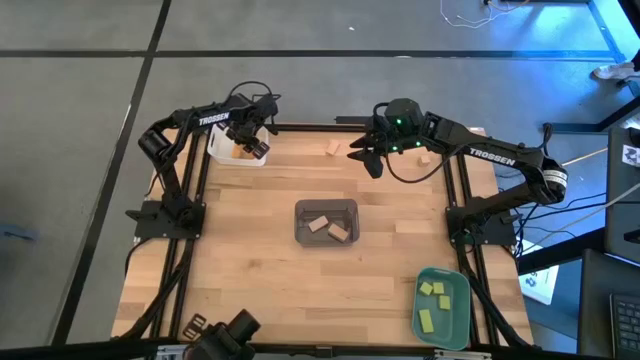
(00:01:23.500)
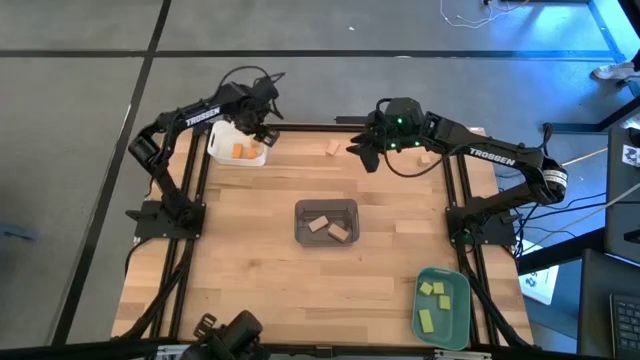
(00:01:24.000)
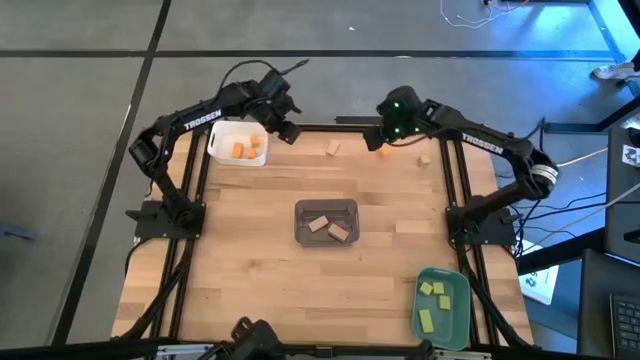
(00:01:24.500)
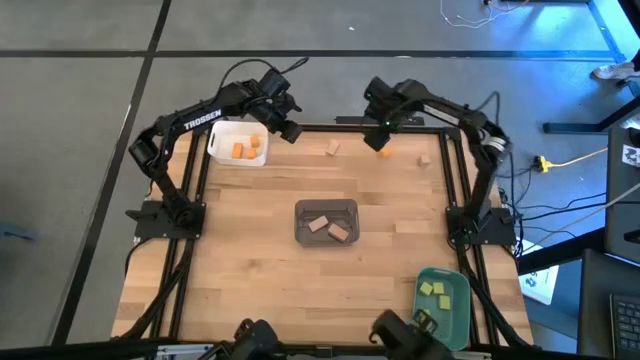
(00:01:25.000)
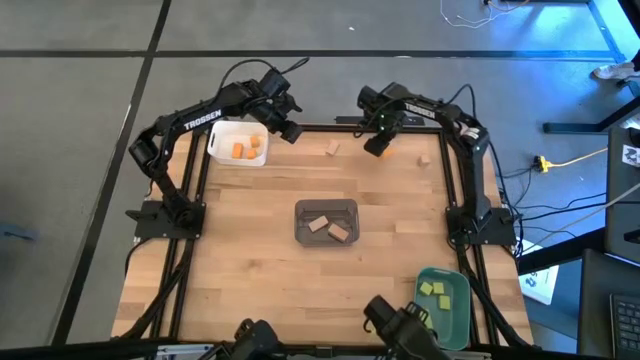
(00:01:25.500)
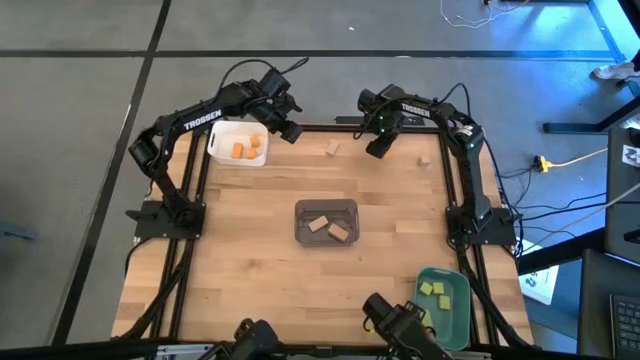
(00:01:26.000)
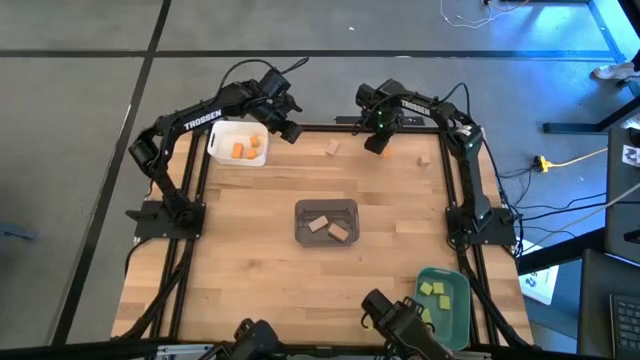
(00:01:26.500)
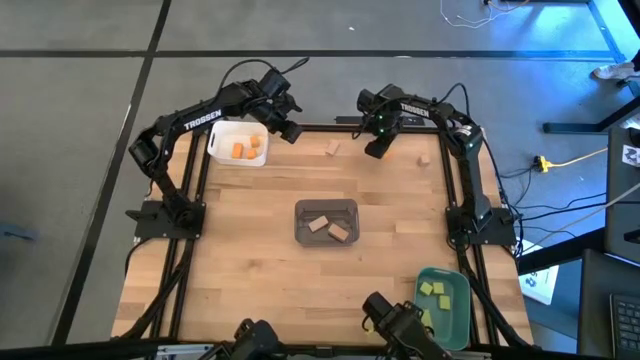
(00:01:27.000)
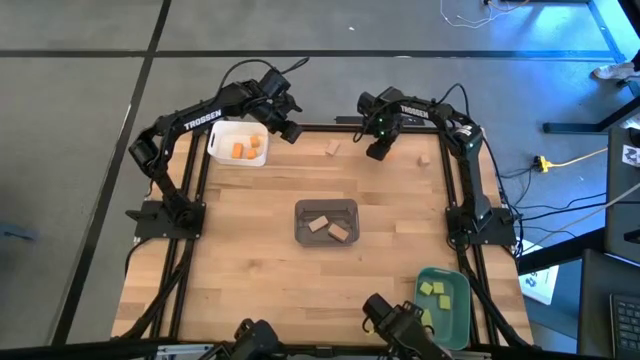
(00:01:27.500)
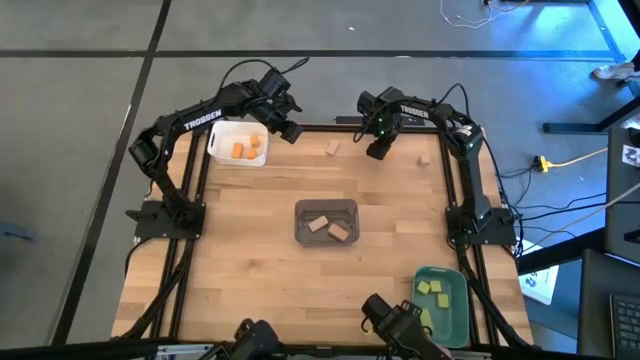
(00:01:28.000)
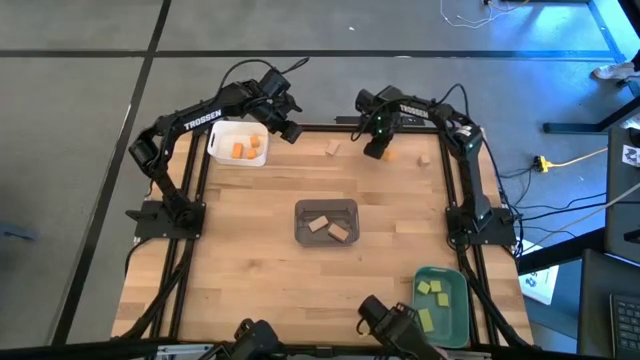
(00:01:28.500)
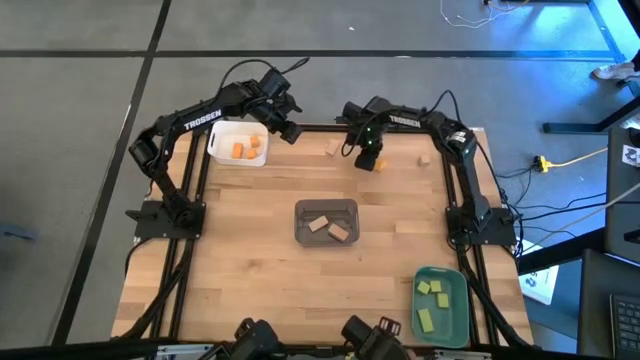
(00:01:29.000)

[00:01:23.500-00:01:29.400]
Task: Sort & place blocks by color
Put the yellow block into the white bin

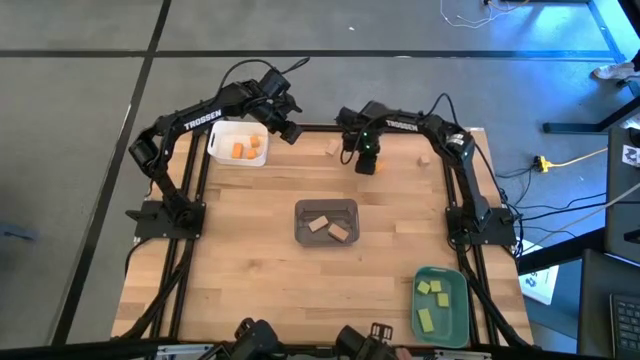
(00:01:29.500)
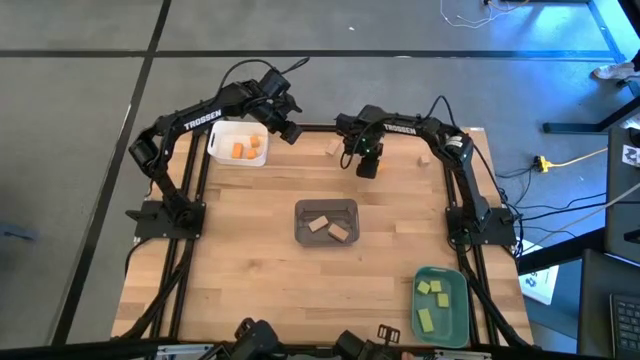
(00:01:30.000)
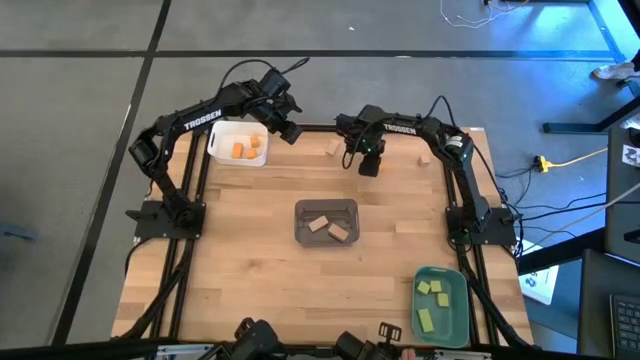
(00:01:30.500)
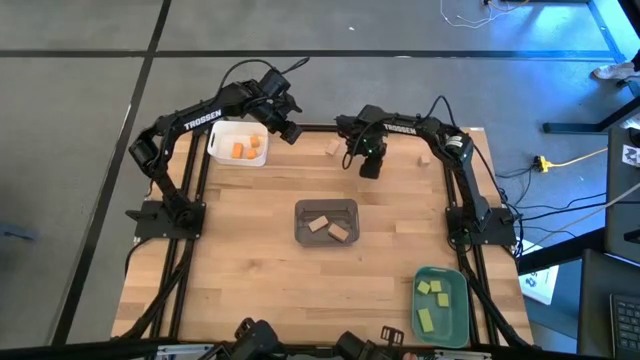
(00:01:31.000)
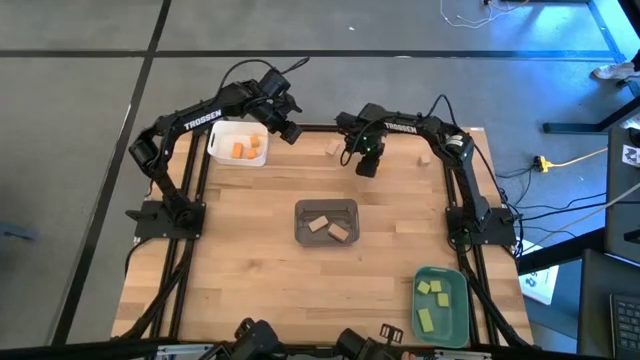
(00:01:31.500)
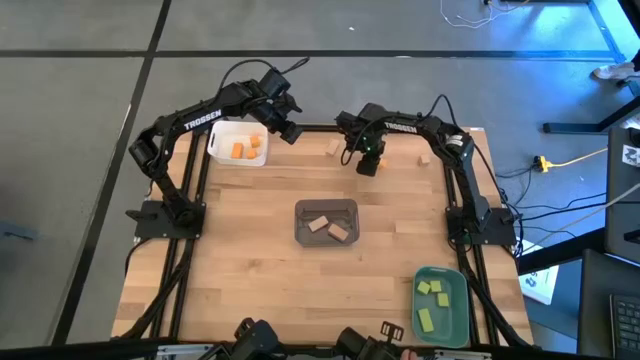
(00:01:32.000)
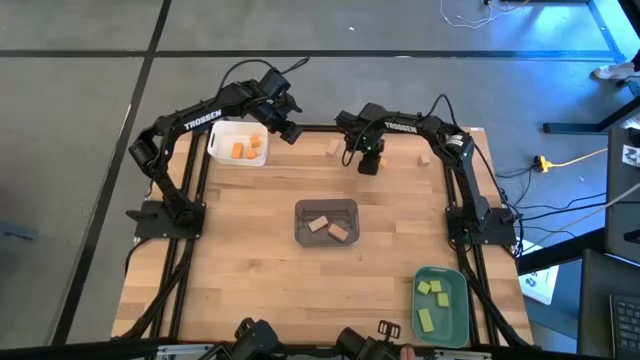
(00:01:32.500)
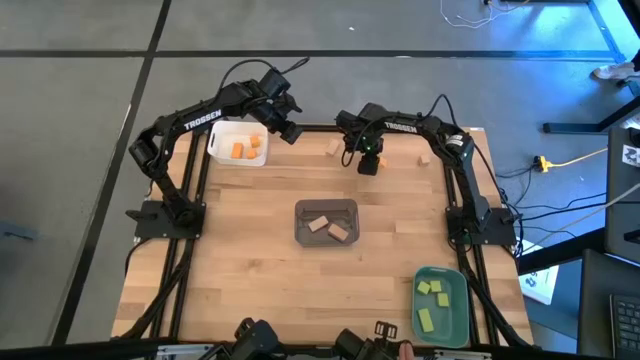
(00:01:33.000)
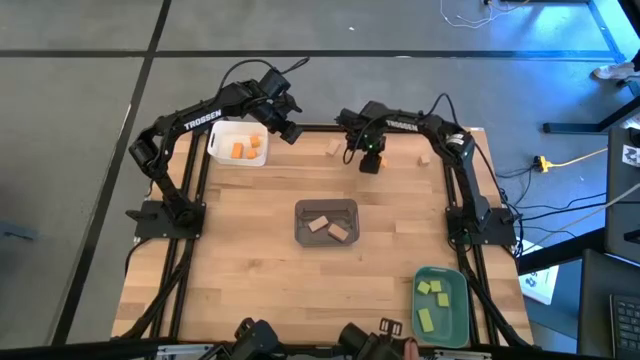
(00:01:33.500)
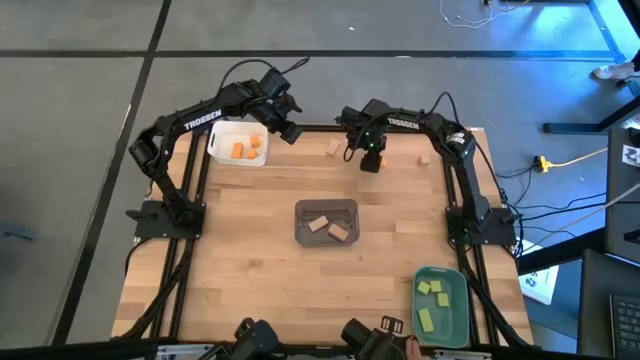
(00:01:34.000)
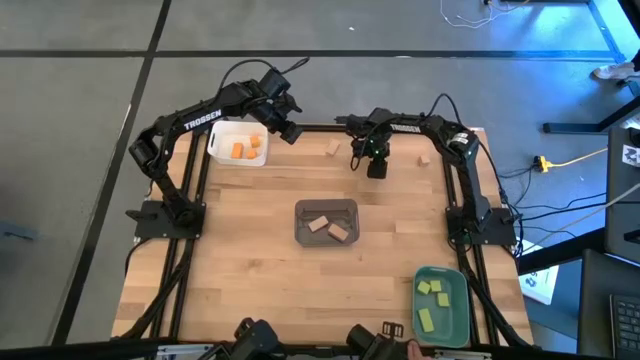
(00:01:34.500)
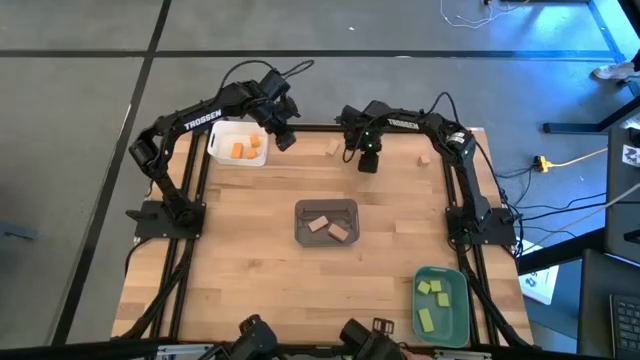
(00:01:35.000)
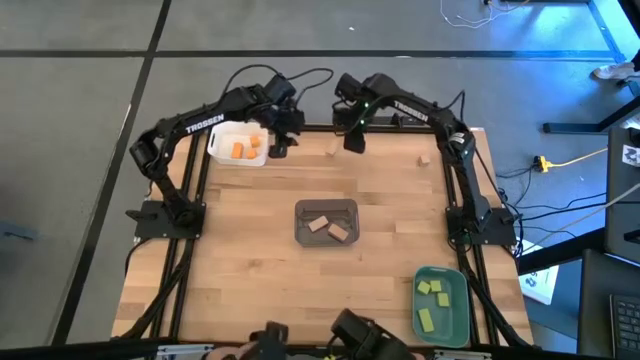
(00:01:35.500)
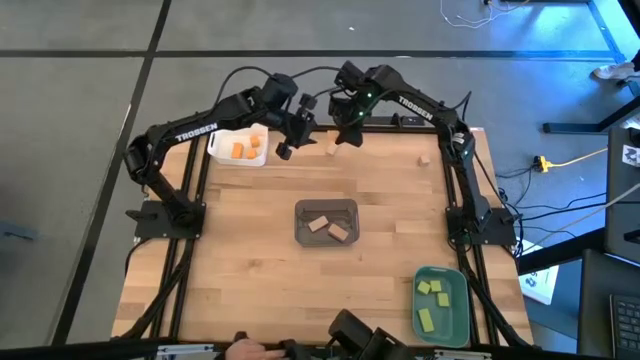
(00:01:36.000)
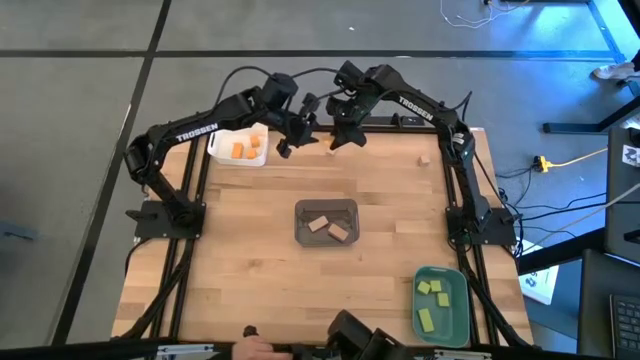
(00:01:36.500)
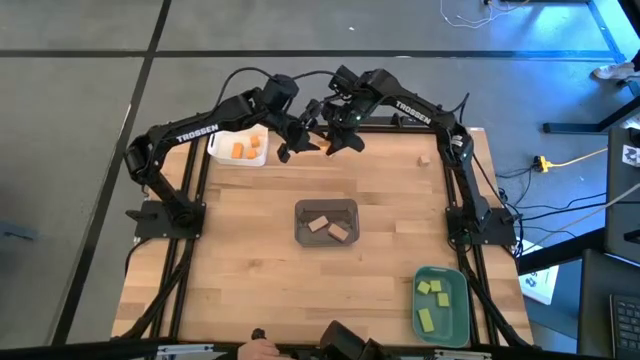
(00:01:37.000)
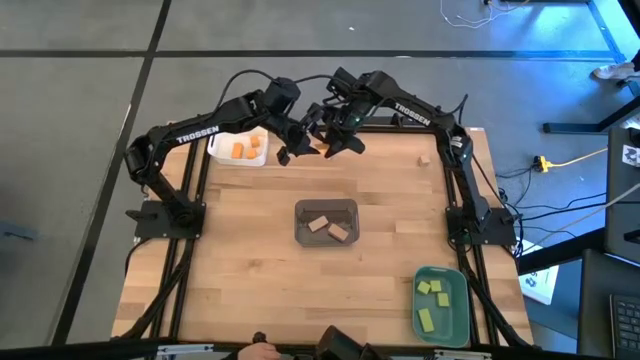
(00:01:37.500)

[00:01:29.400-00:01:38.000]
Put the yellow block into the white bin

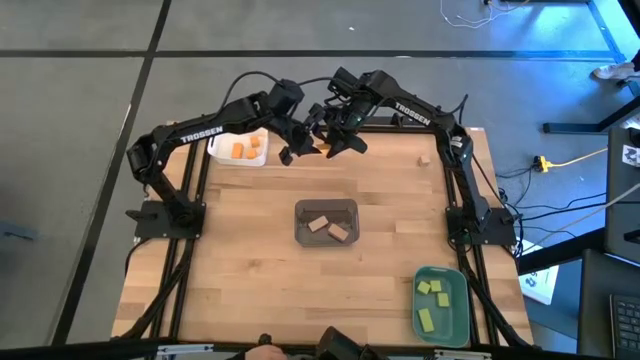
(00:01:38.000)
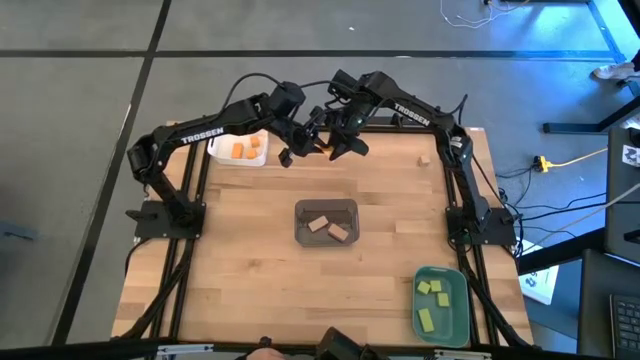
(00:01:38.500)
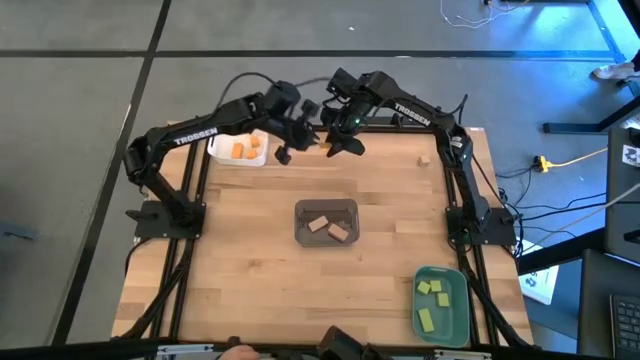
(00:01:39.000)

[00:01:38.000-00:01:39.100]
Put the yellow block into the white bin

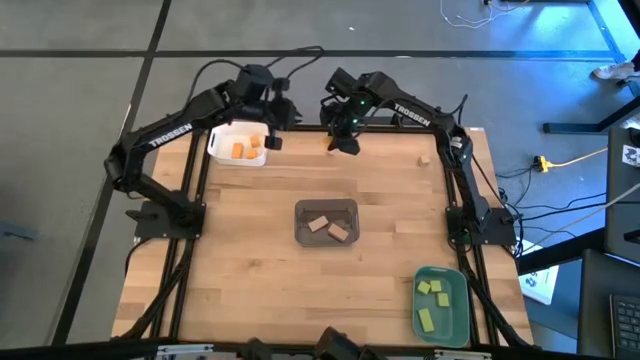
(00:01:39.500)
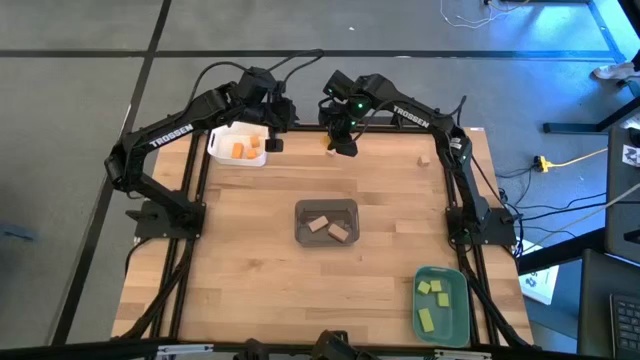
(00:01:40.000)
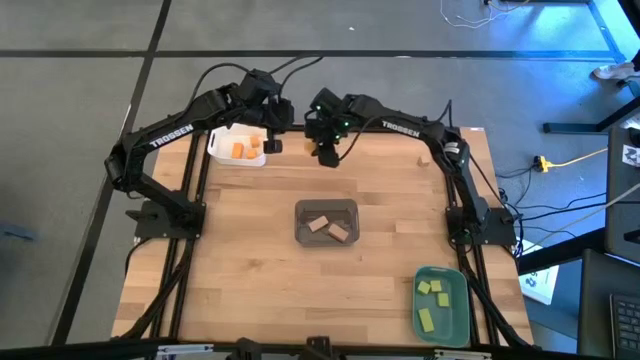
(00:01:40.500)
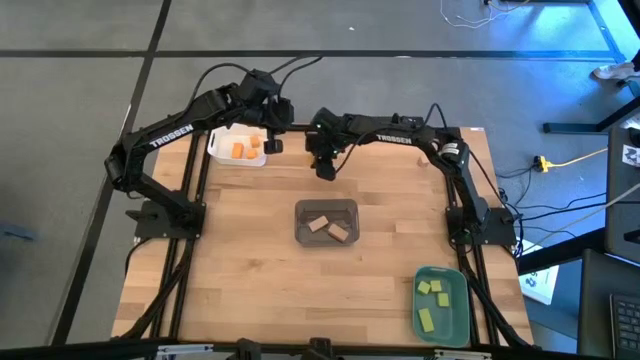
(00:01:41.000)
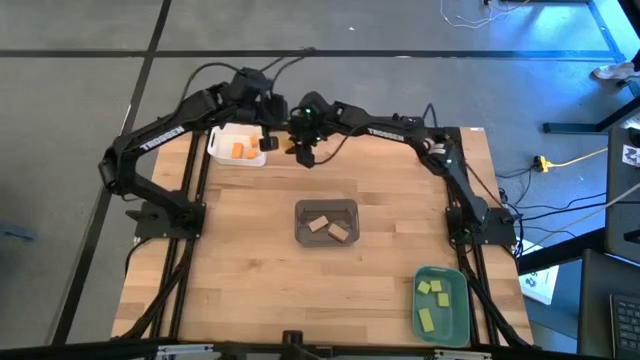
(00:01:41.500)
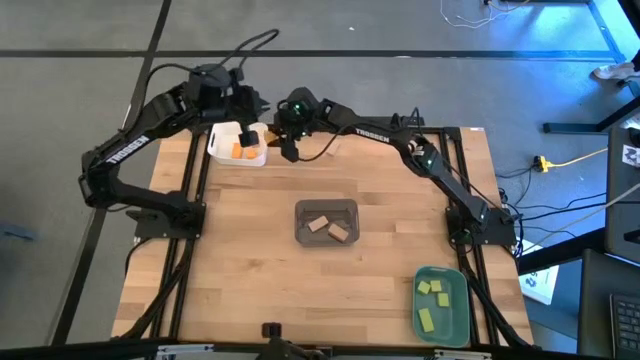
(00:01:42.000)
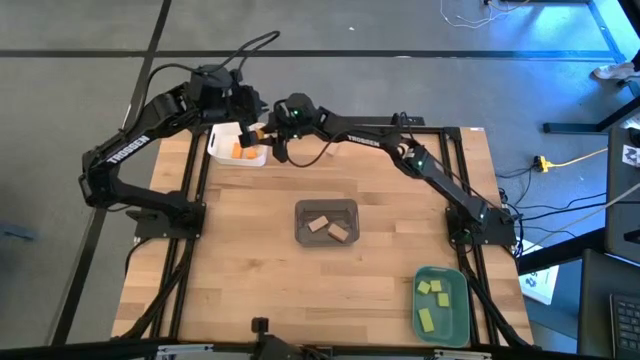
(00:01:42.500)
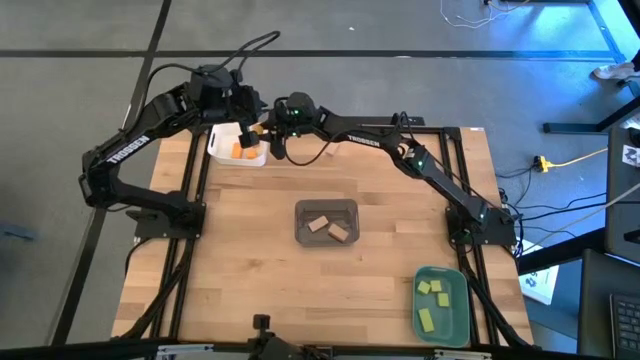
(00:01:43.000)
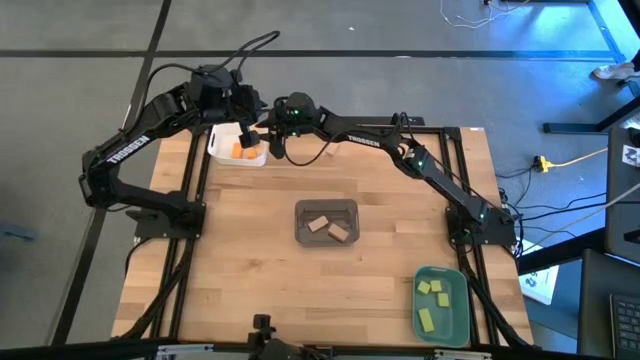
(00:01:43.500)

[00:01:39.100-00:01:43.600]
Put the yellow block into the white bin

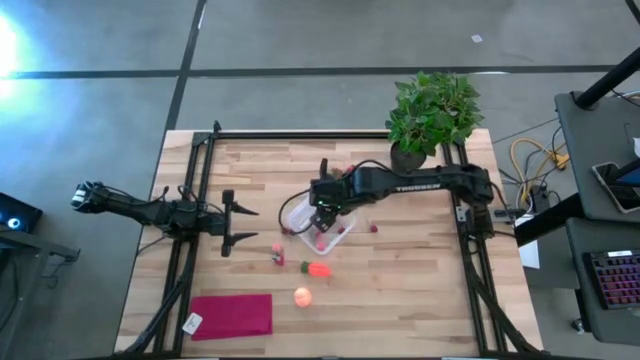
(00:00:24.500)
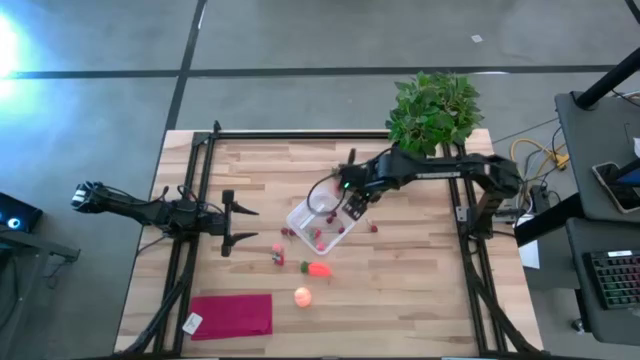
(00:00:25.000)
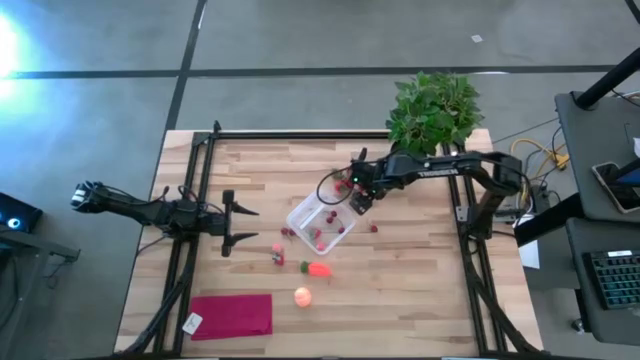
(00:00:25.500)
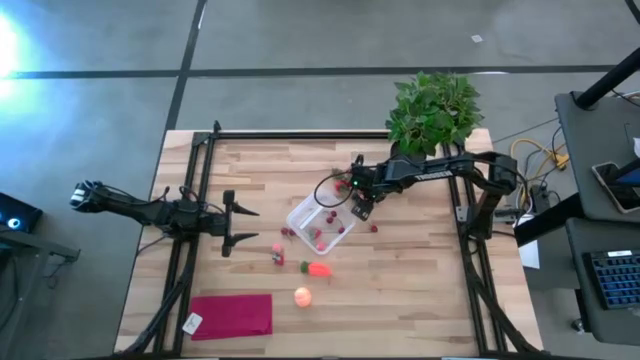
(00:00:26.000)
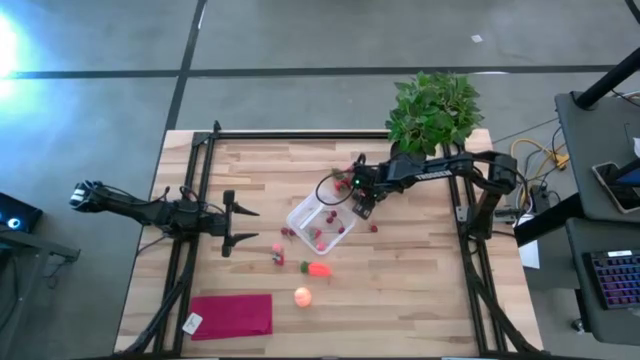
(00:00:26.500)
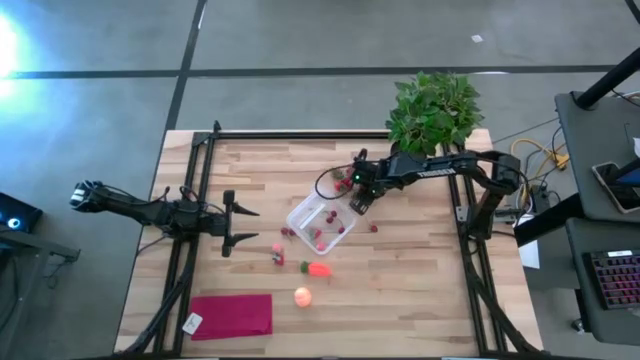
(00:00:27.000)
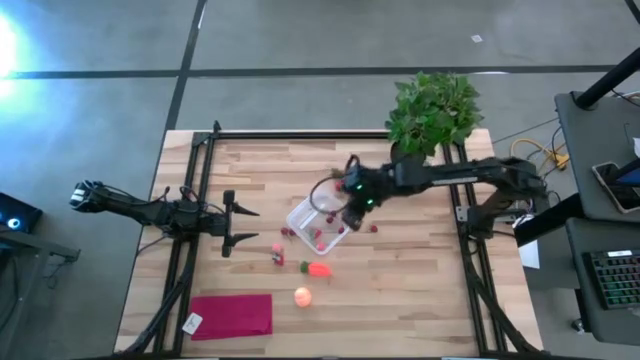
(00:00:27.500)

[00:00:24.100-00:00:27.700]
Task: Pick and placing Produce into tupperware
Put the pink peach into the transparent container
